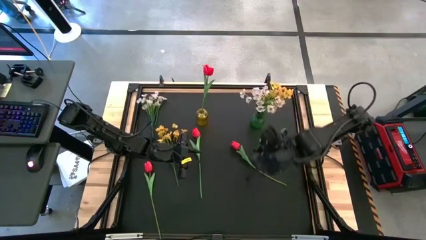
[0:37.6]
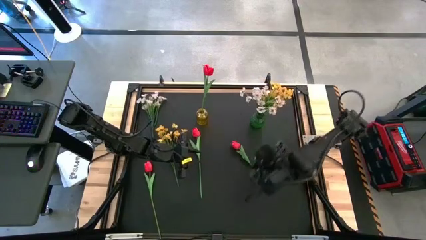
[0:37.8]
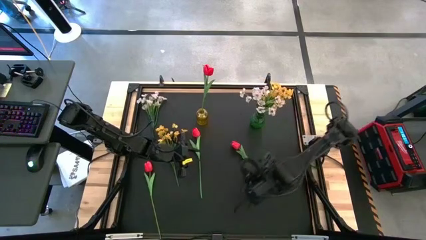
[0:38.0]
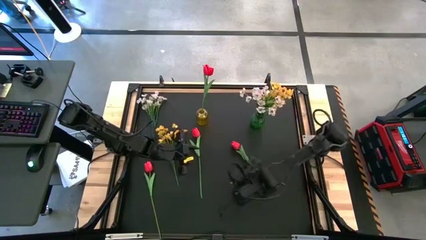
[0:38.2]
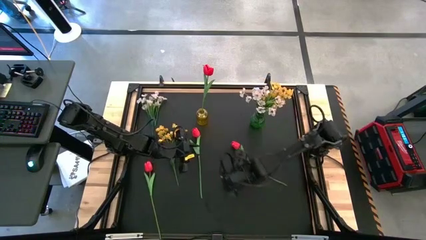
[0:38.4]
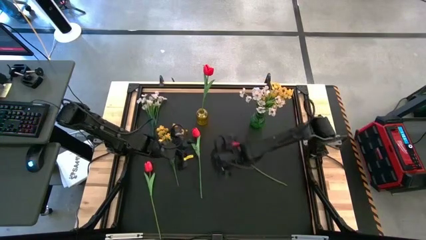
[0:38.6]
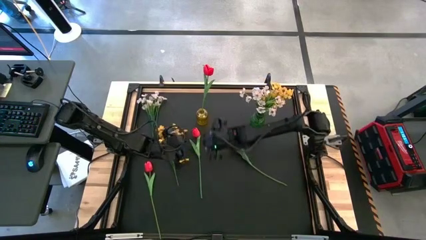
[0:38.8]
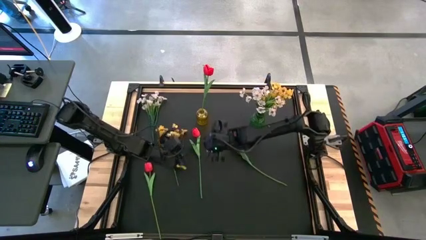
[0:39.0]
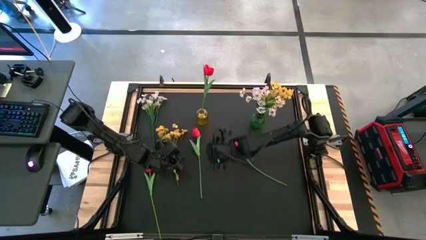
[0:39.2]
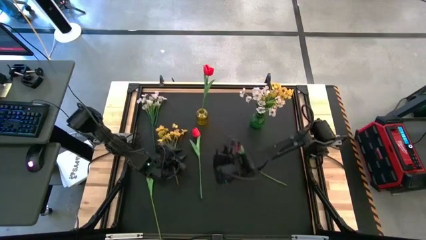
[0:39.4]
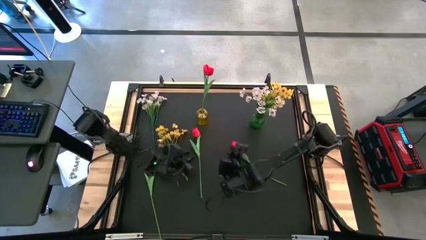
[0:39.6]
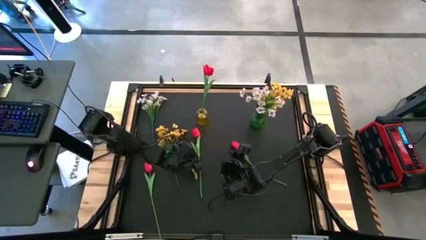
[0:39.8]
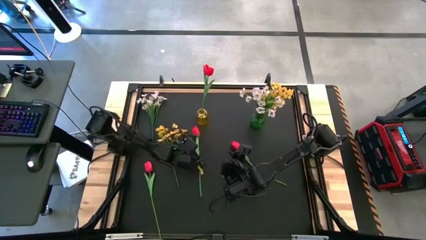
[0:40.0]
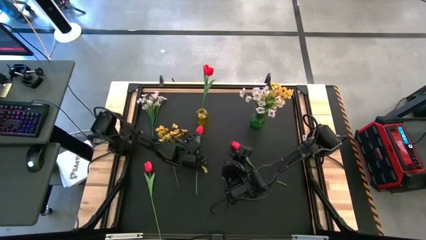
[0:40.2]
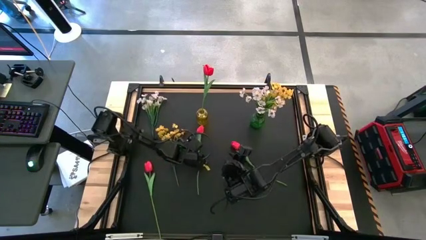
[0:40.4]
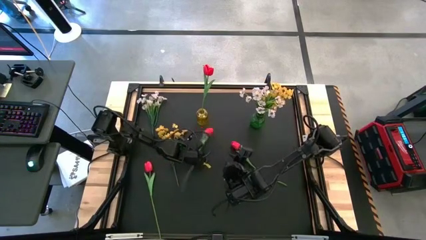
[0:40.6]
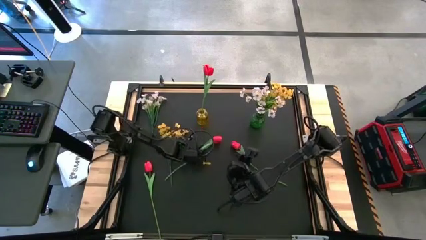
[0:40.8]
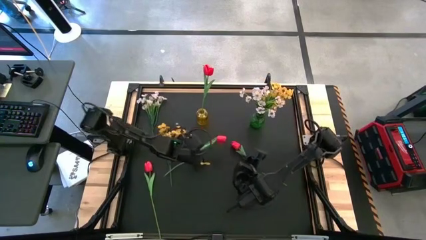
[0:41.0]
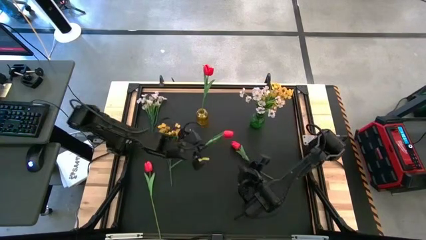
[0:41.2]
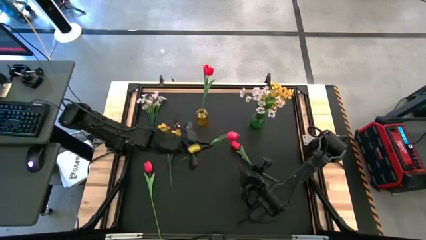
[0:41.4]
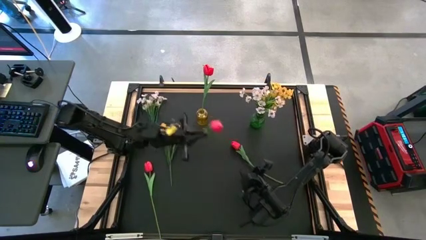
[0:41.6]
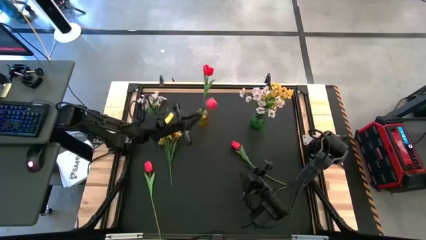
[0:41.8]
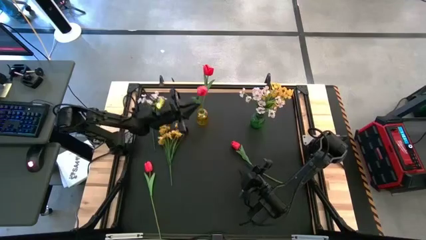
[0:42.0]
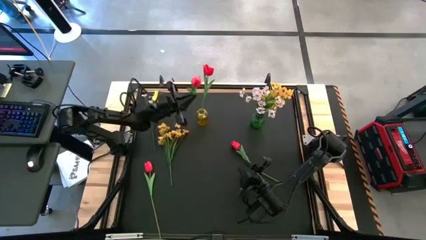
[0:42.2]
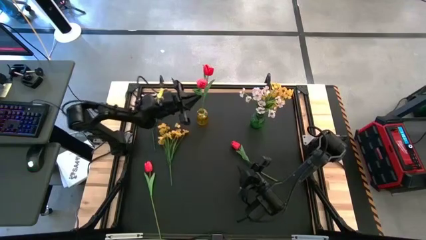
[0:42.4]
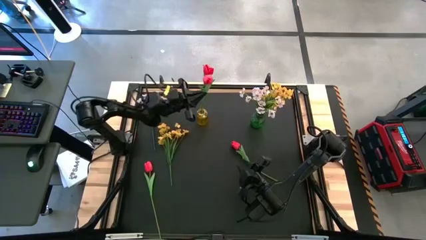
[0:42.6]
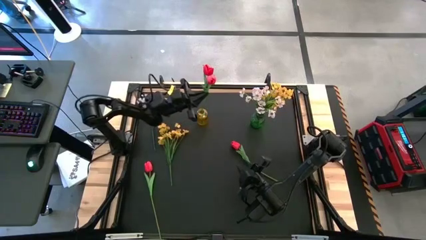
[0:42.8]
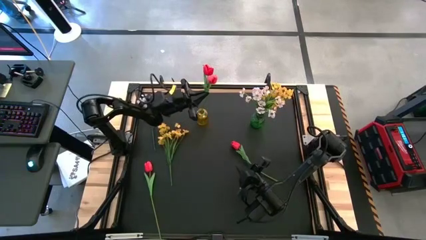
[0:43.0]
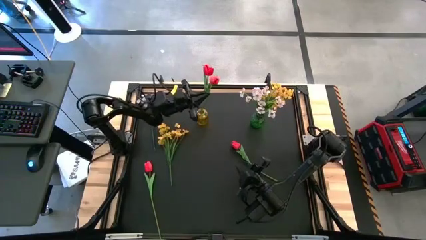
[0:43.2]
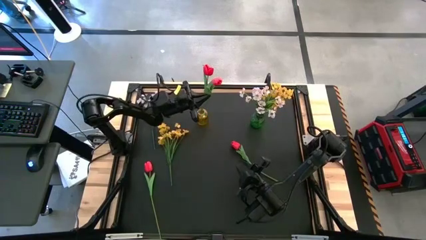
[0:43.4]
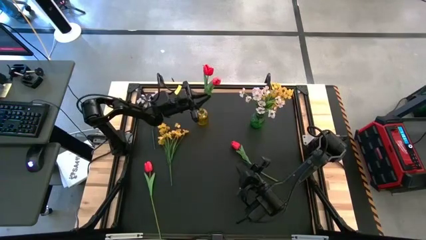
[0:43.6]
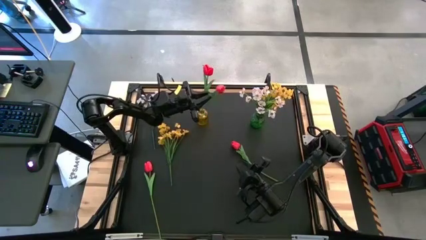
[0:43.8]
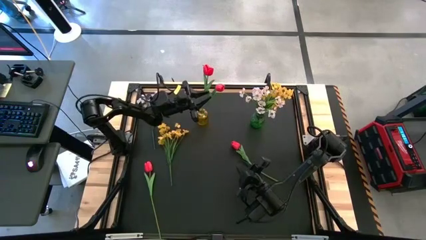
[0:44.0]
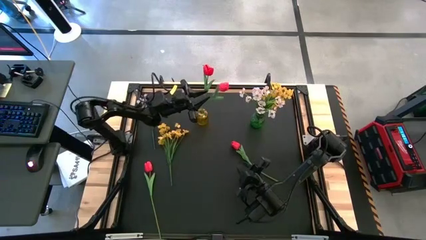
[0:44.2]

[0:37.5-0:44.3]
Task: Sort flowers into vase by color
Put the red tulip into the yellow vase

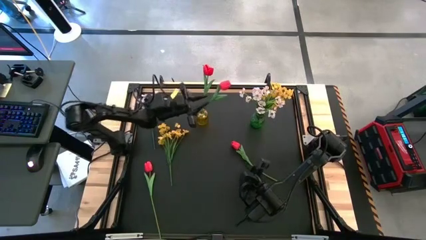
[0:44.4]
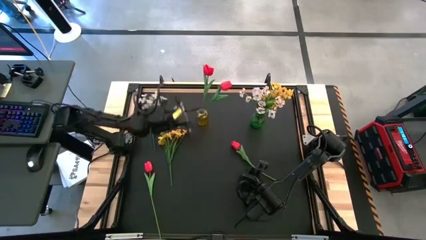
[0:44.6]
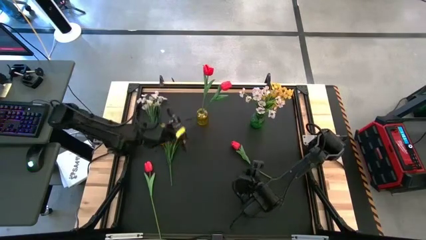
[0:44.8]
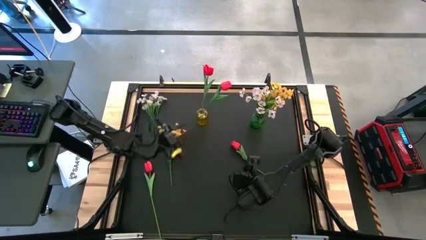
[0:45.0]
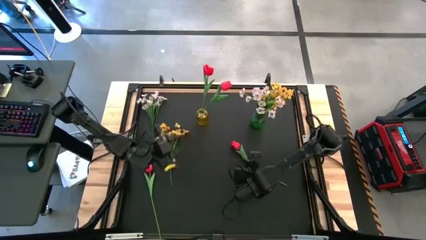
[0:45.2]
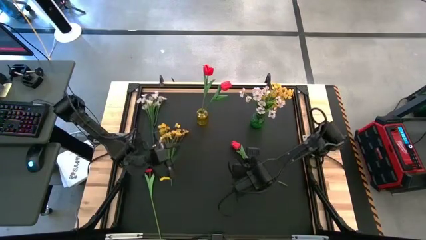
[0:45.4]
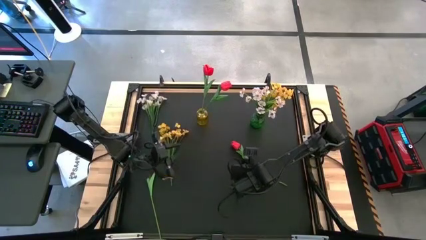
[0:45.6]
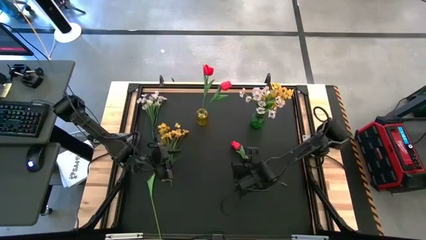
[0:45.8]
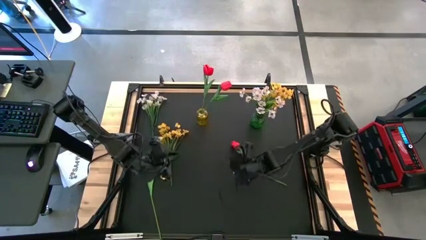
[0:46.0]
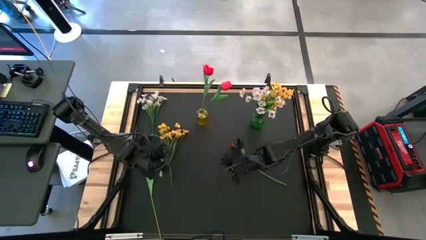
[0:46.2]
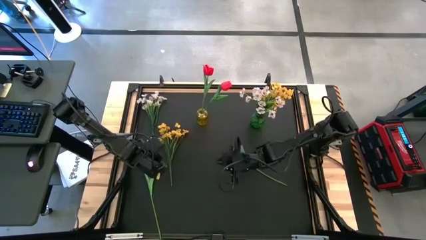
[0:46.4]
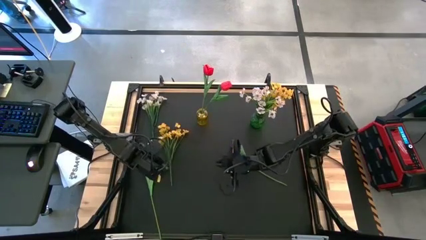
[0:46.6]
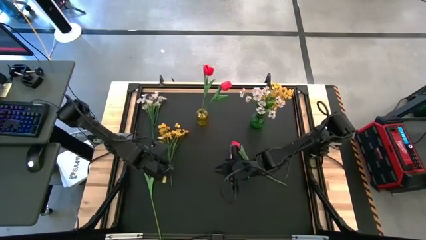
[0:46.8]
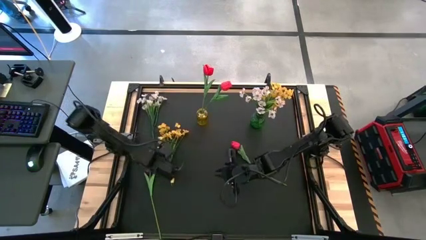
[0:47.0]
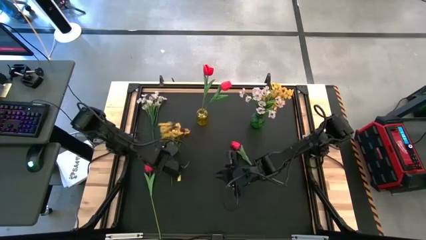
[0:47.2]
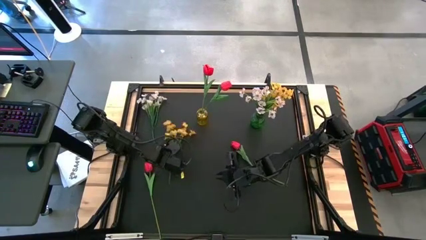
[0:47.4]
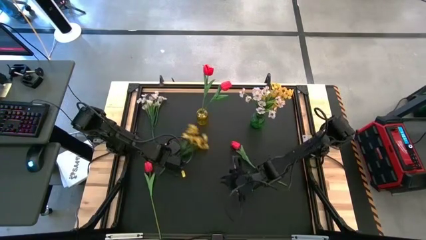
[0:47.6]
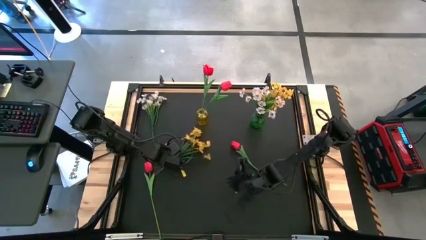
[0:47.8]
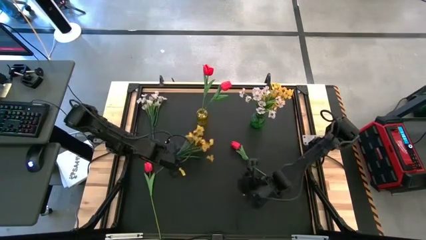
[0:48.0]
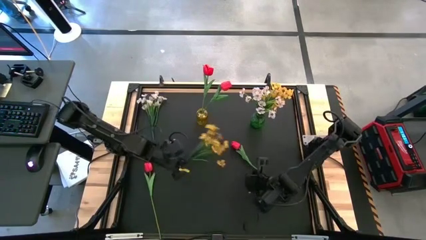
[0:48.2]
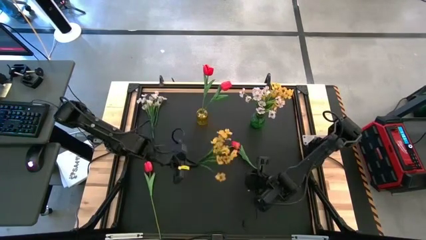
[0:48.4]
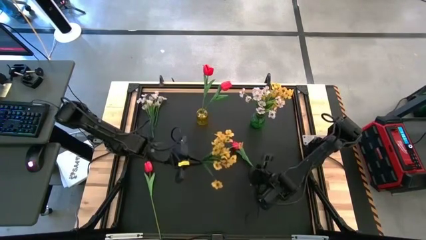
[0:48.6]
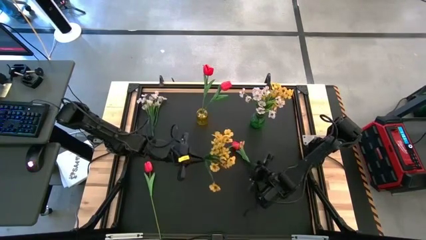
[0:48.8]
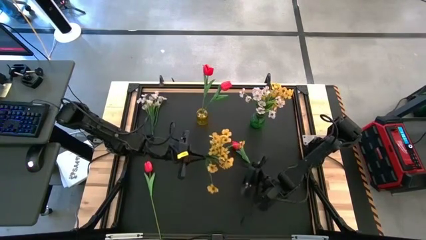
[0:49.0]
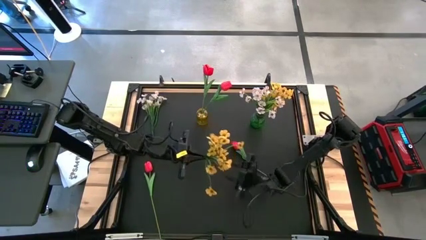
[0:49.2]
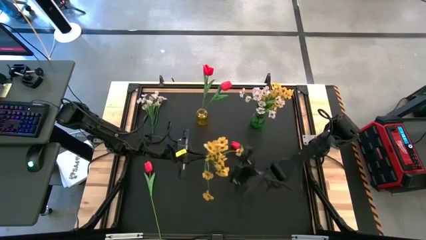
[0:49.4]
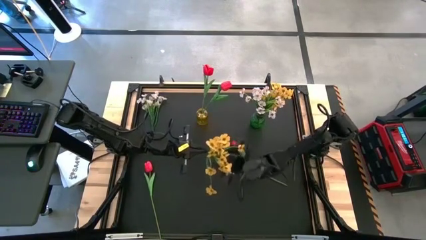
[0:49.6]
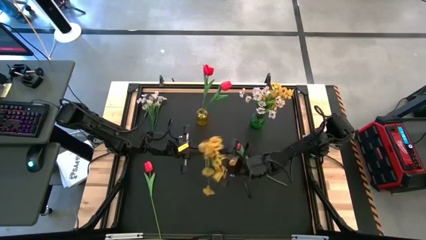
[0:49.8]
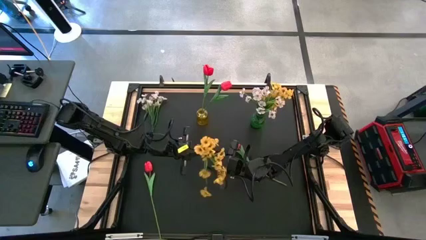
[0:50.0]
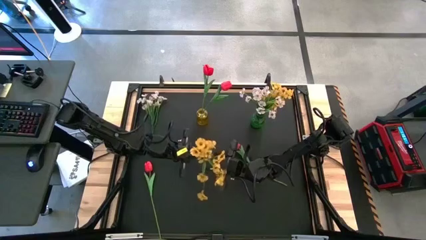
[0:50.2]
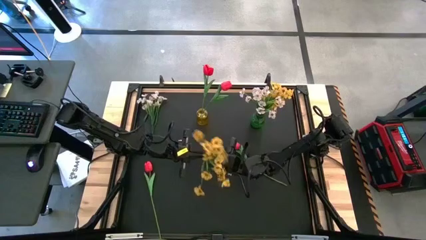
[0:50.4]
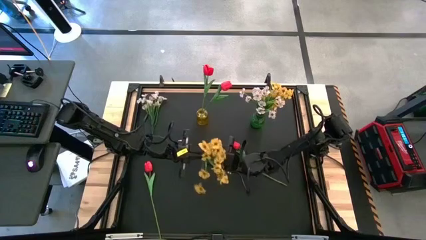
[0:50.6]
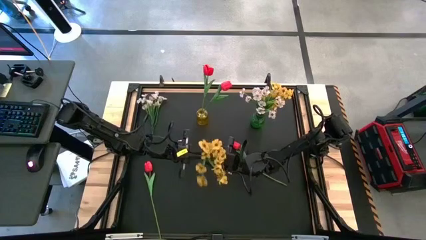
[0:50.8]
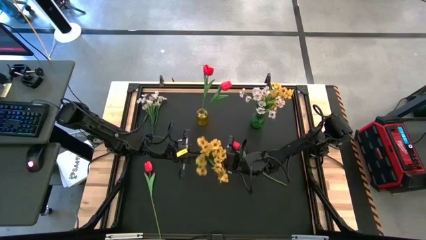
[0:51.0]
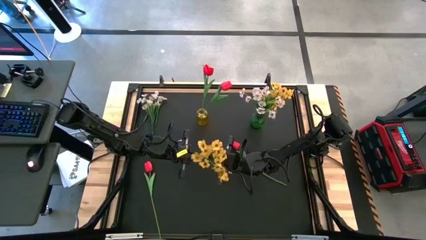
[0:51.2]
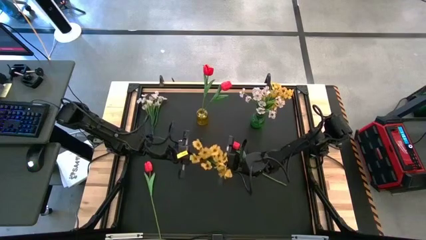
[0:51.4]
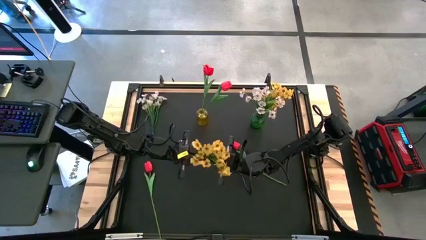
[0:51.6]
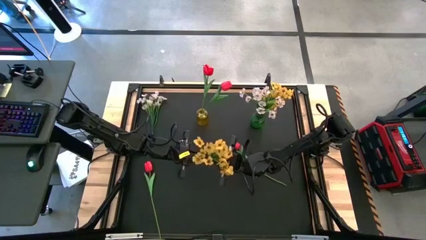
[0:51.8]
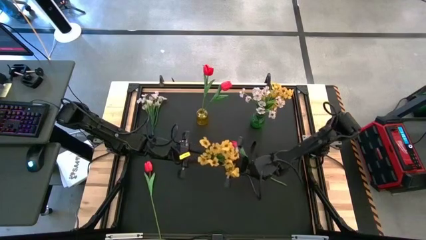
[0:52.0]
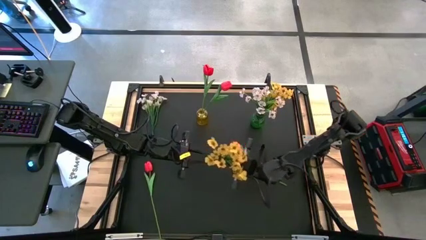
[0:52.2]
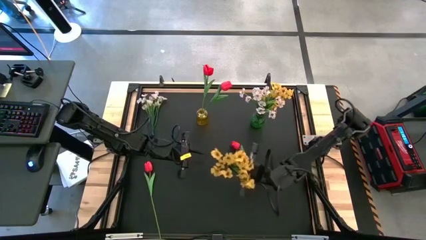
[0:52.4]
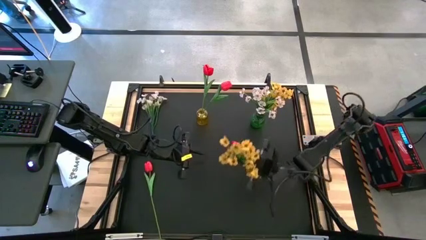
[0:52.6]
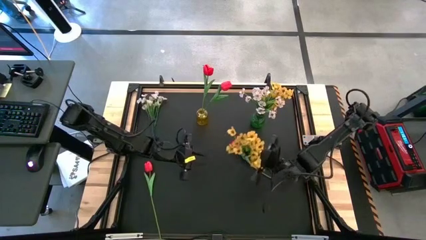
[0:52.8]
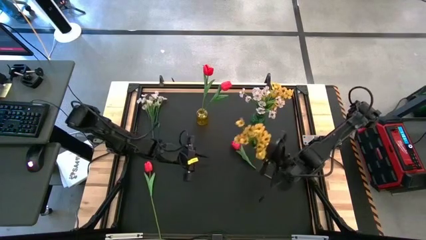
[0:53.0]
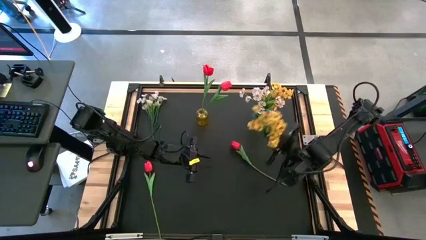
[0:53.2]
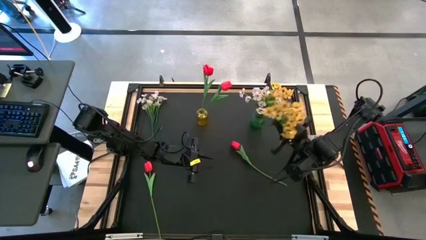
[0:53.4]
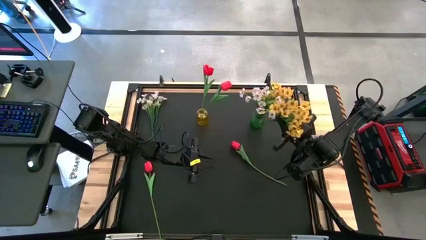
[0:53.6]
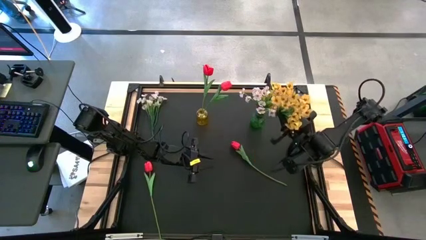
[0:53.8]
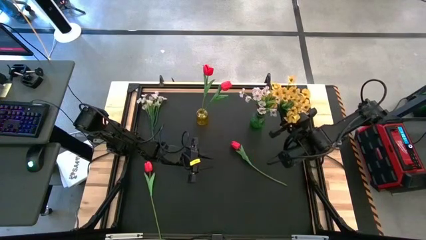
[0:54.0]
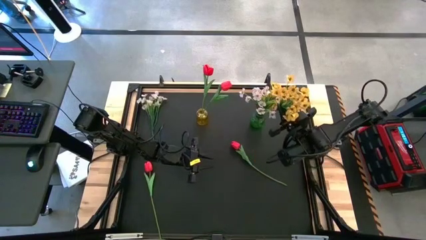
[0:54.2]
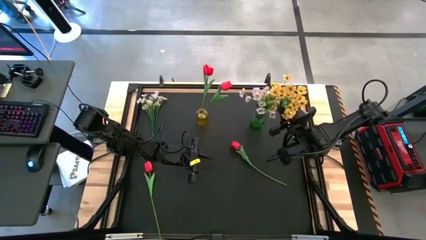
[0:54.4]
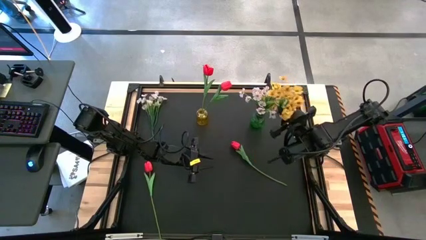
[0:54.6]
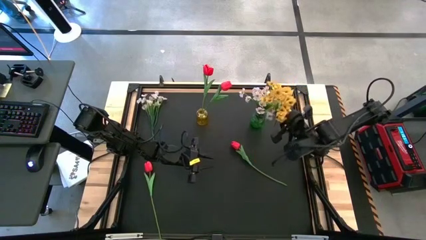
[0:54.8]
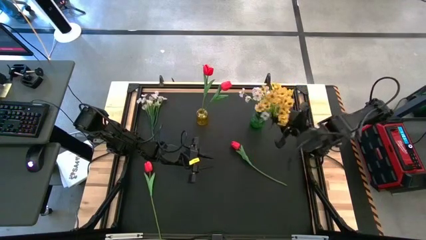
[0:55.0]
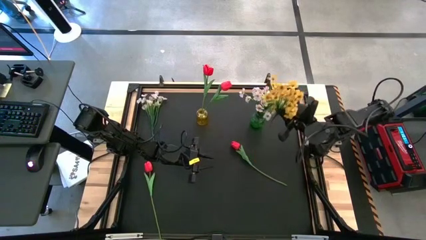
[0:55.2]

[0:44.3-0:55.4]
Put the yellow flowers into the green vase
